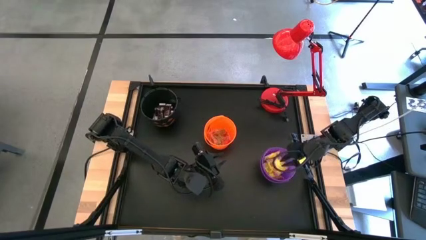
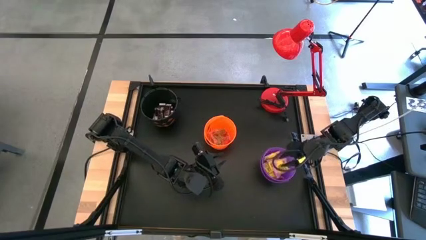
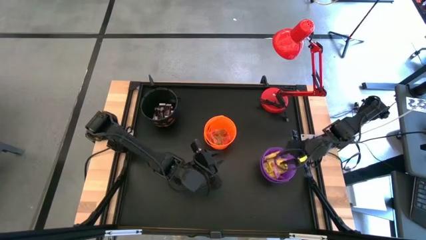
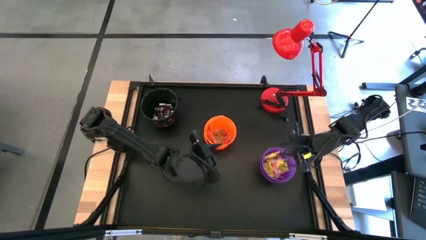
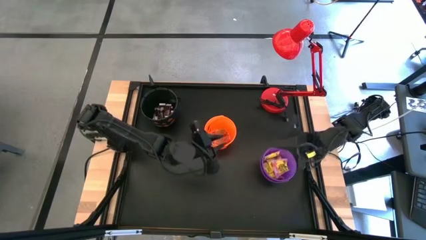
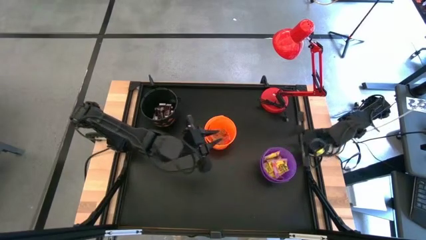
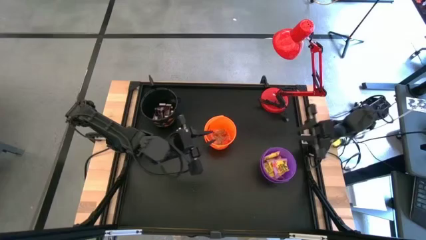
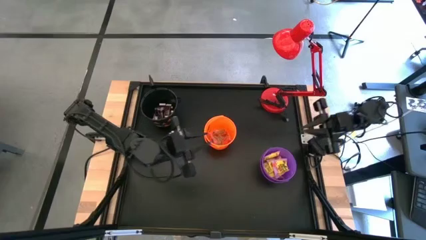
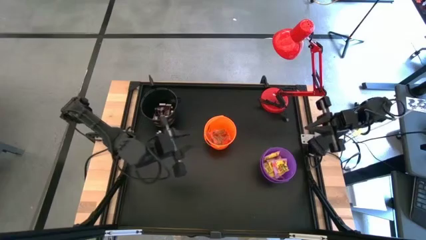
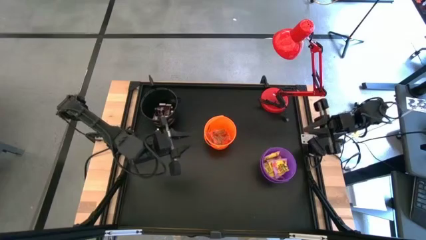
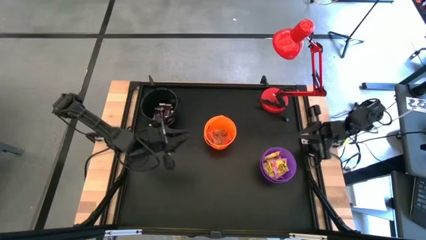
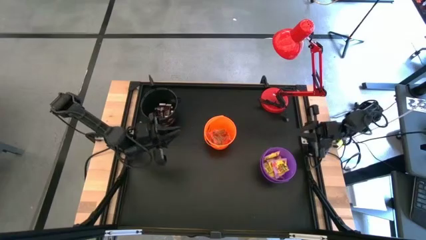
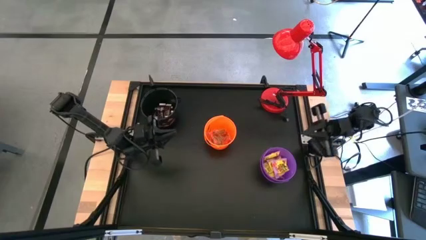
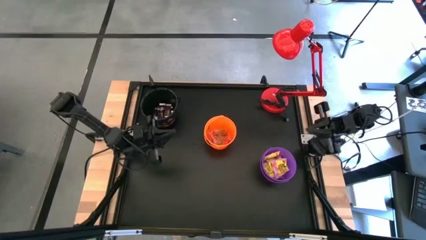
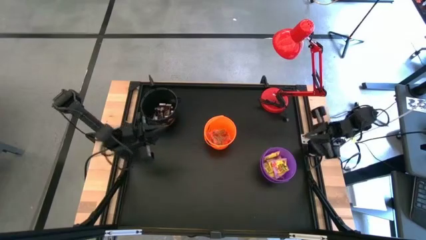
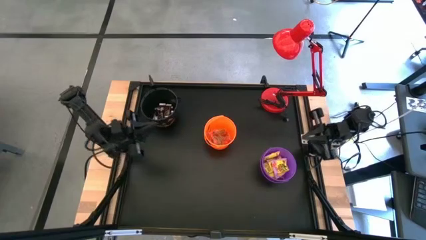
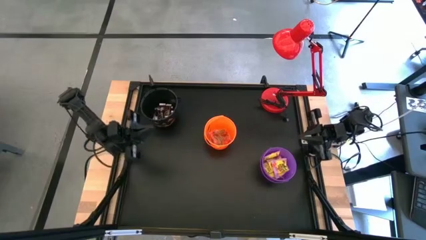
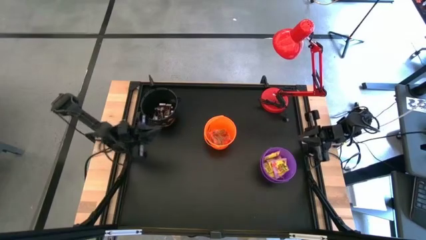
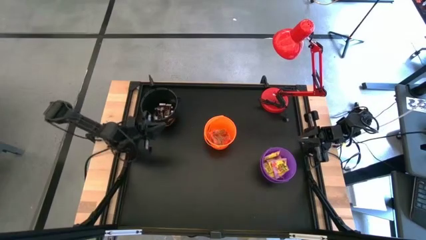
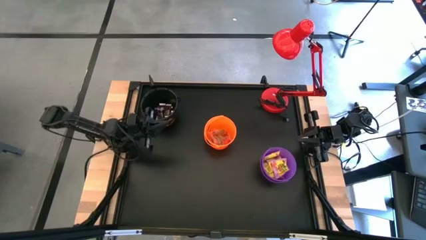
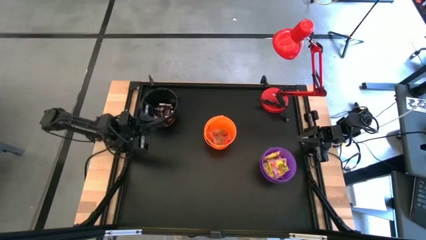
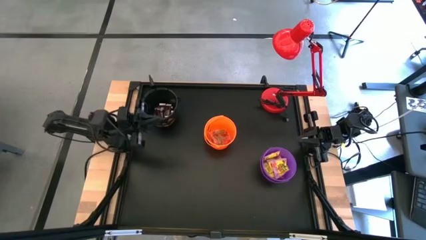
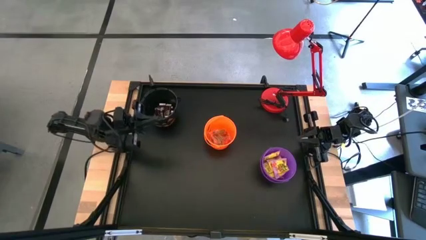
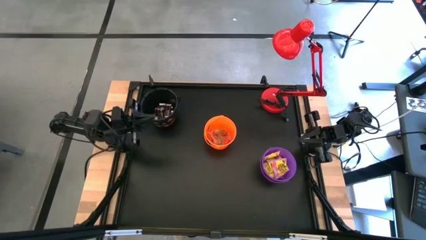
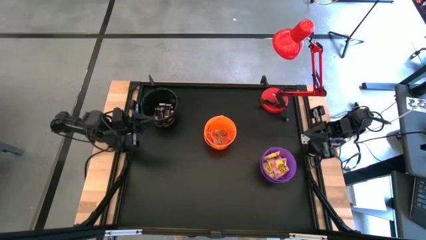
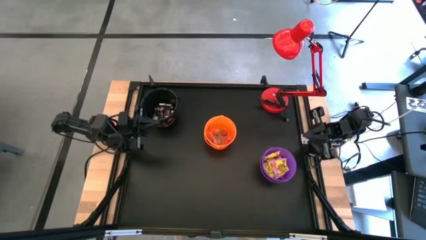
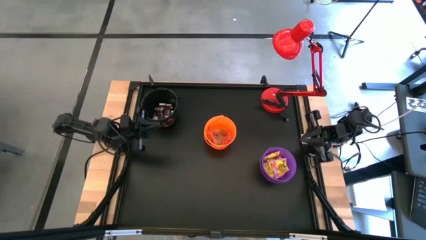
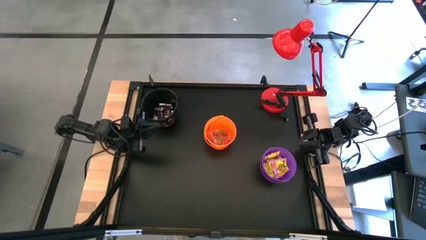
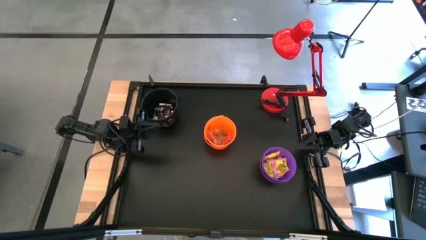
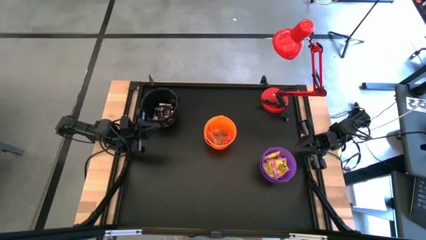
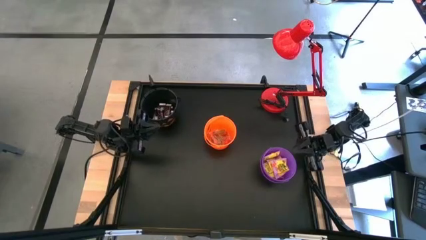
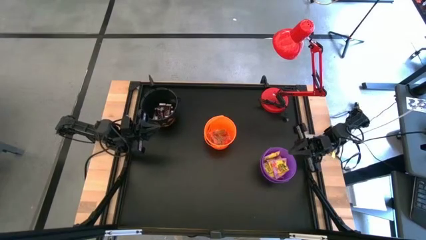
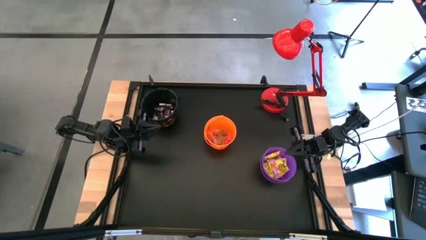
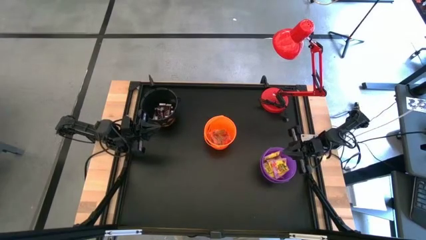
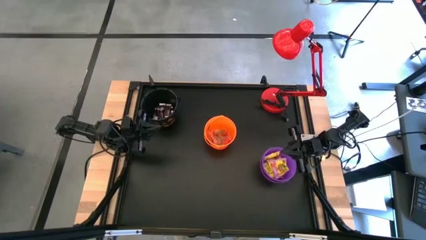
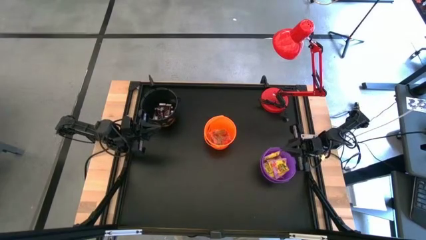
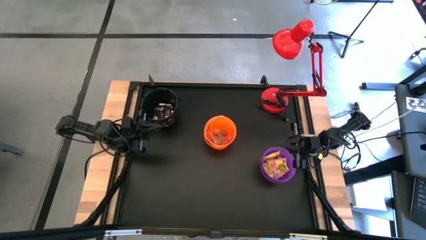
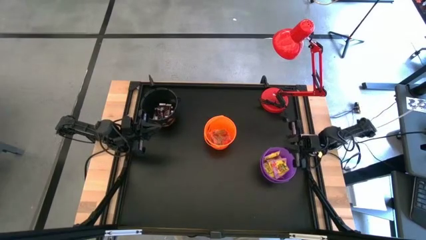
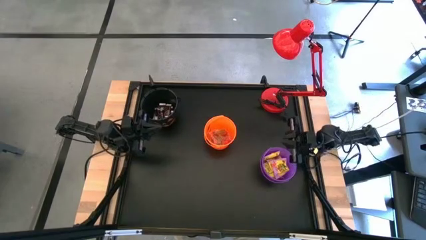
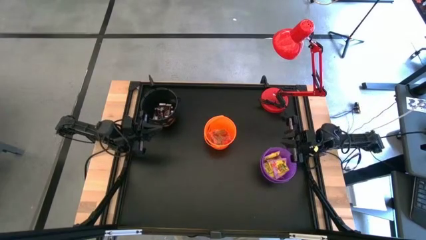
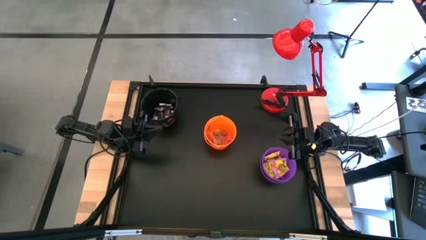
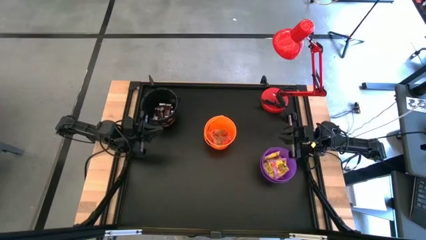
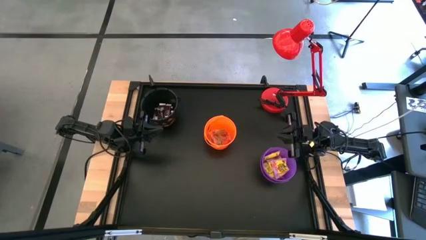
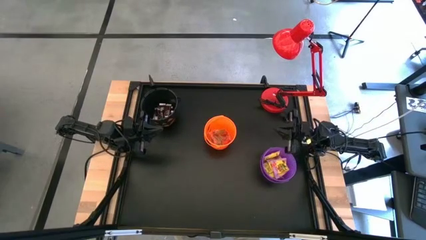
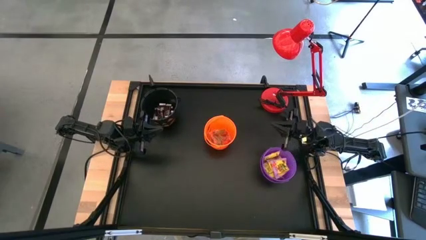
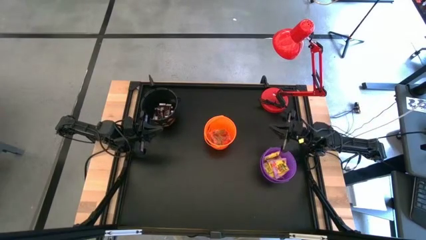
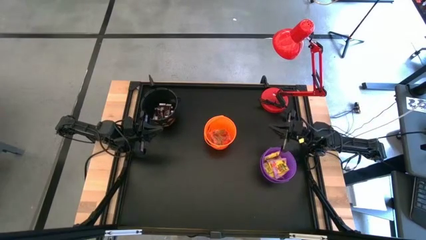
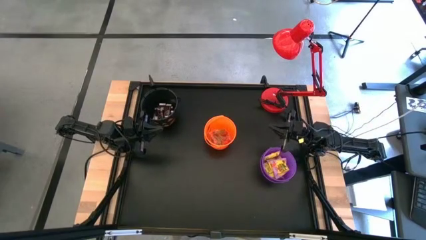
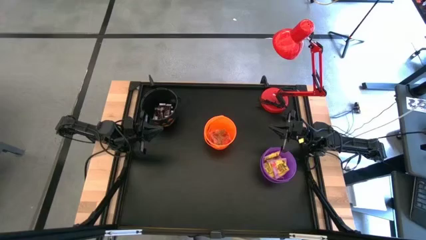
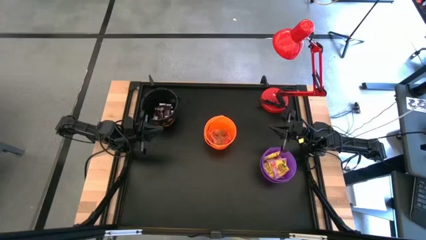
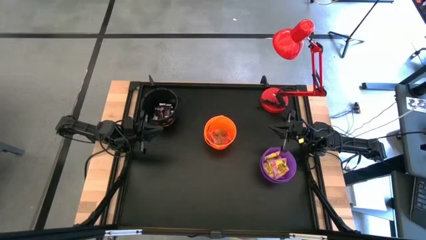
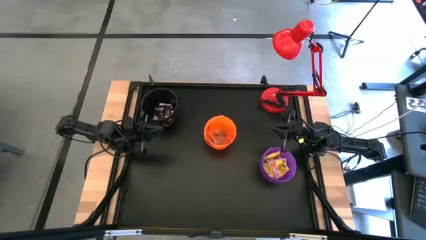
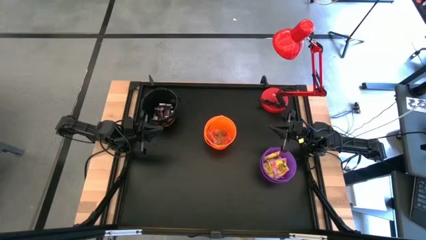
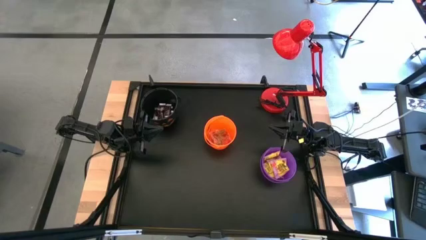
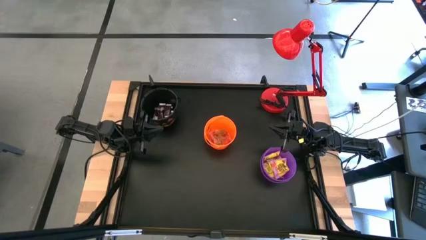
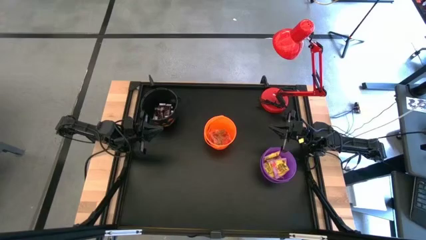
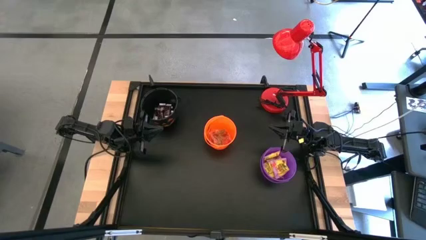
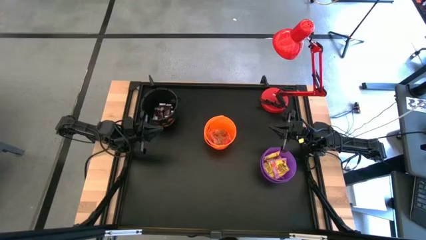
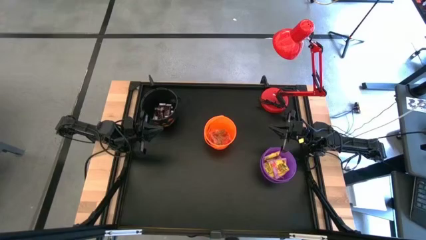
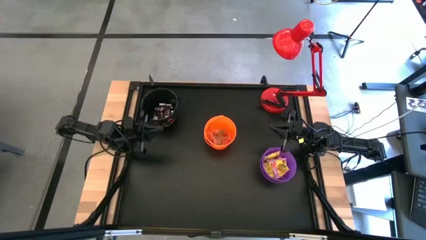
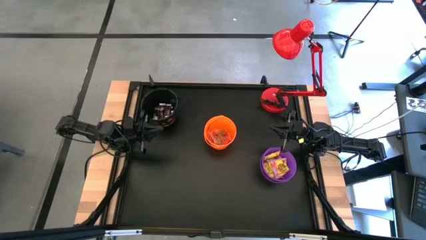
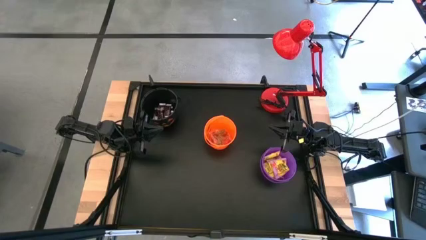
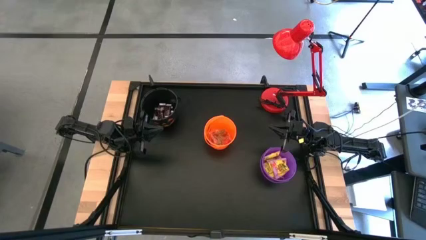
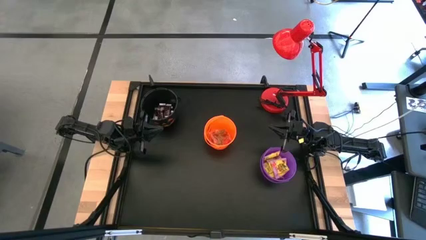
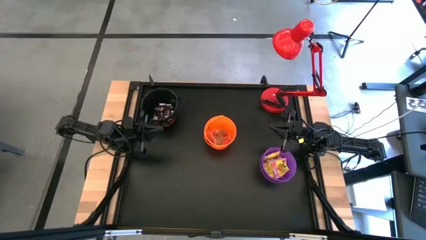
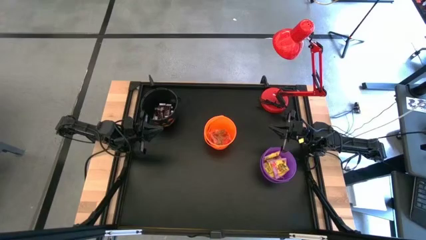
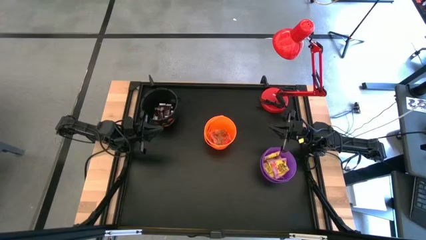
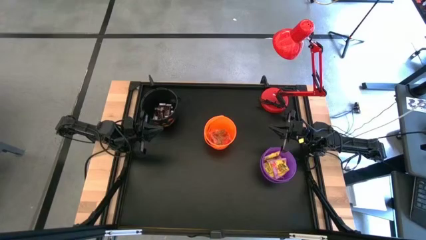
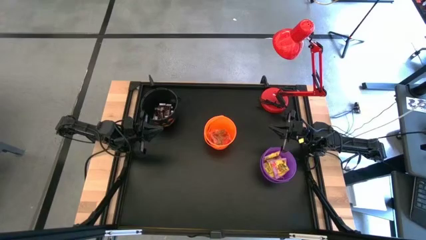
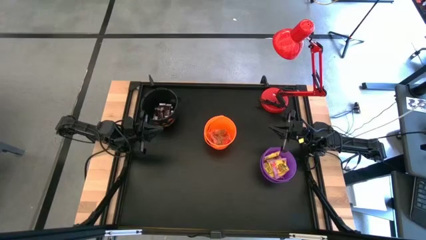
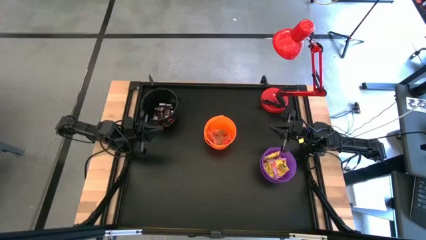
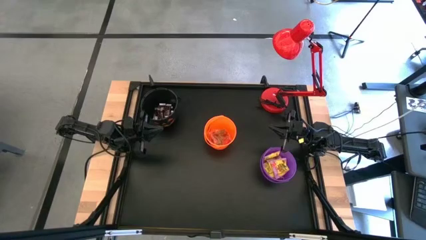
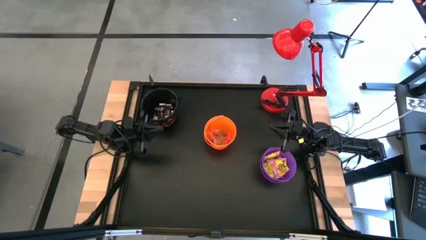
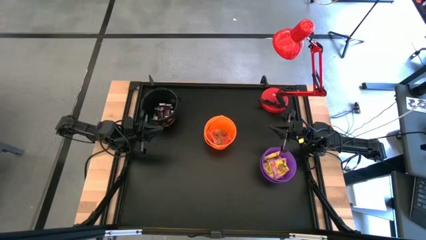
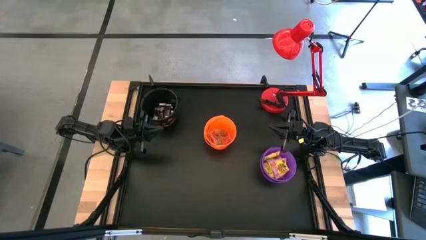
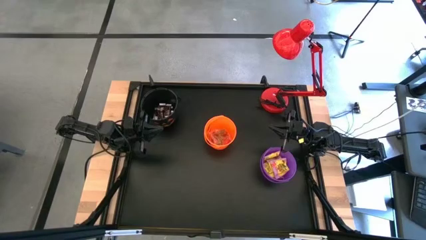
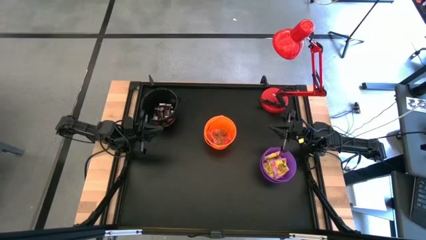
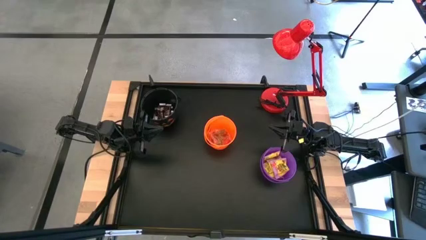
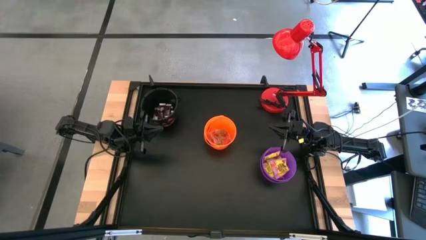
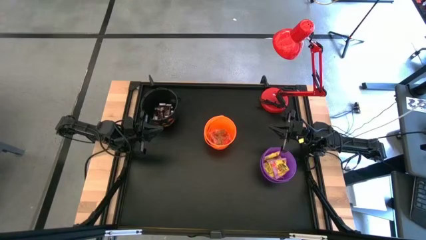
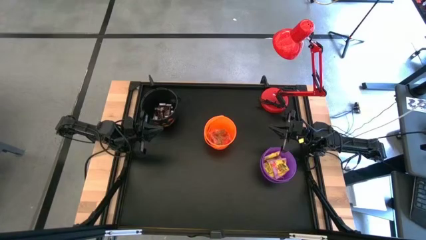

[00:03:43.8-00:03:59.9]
Task: Sort candy
Return to Home Position
